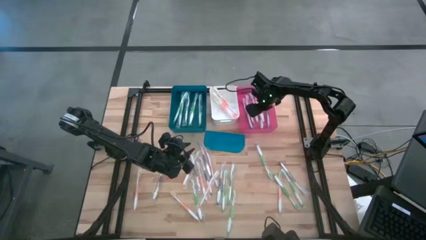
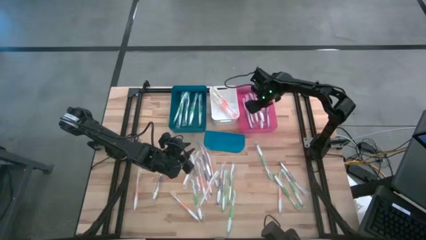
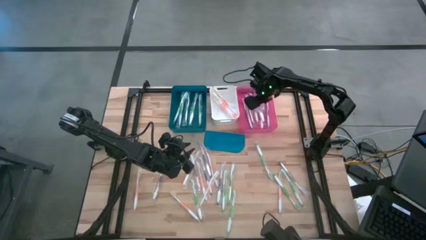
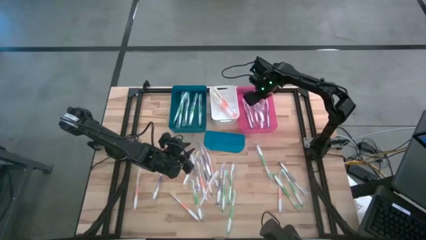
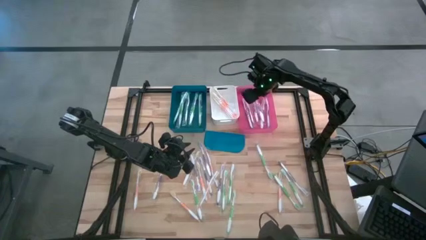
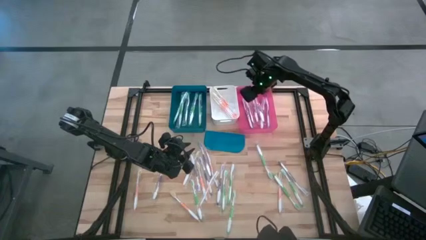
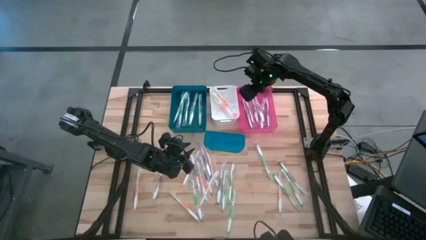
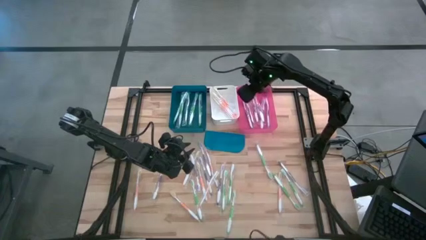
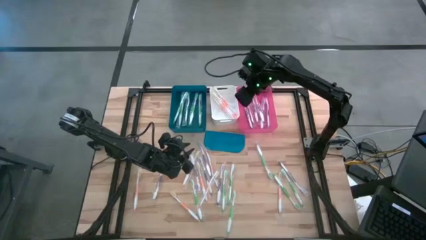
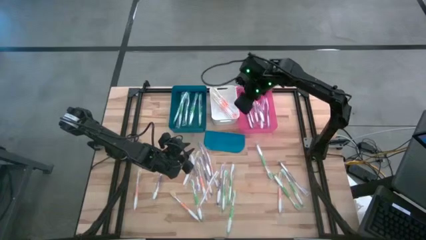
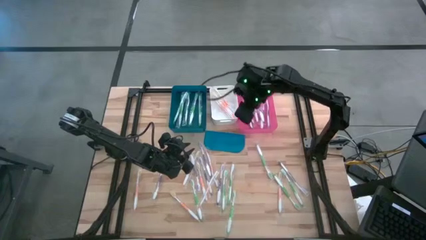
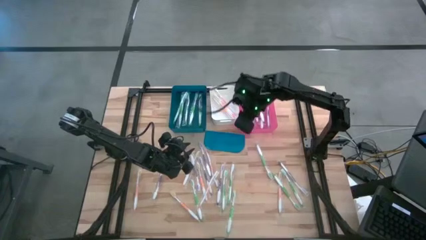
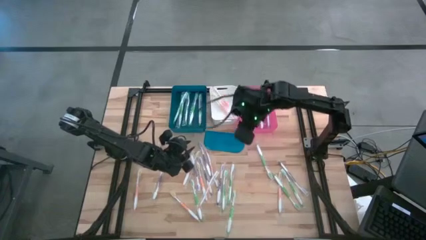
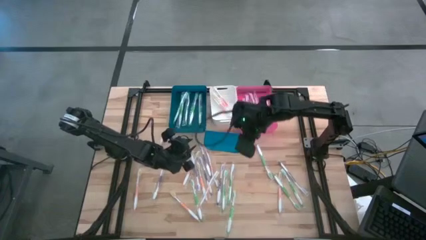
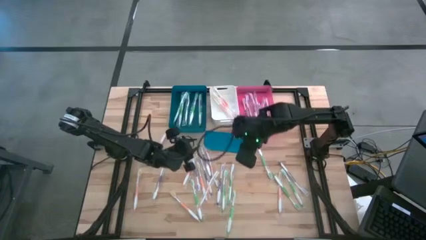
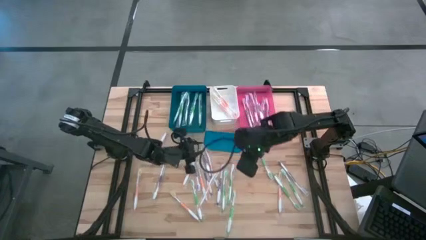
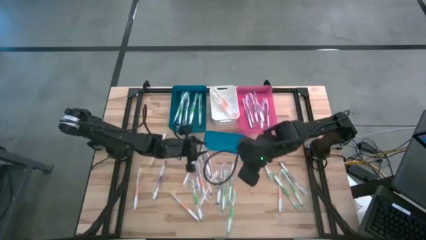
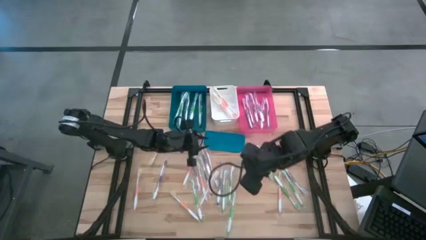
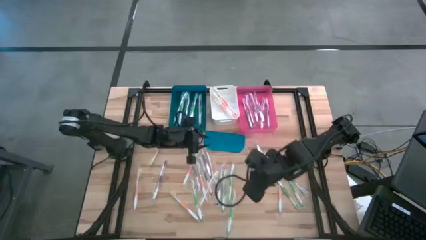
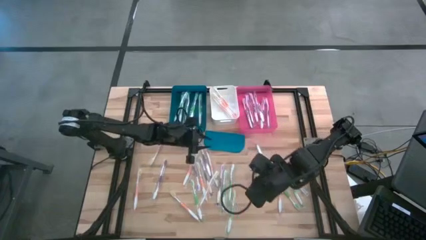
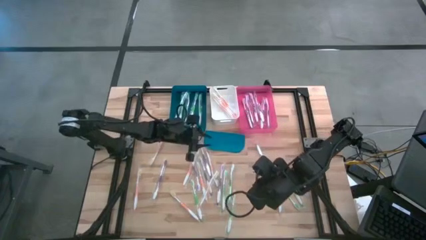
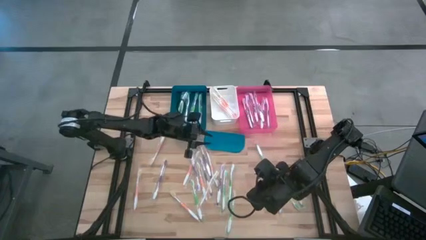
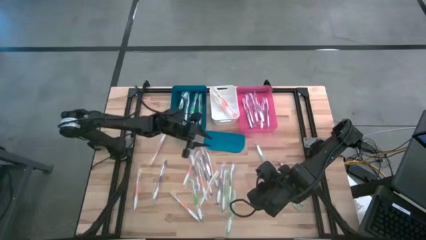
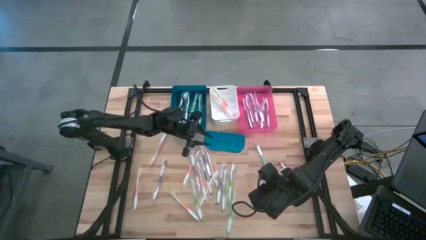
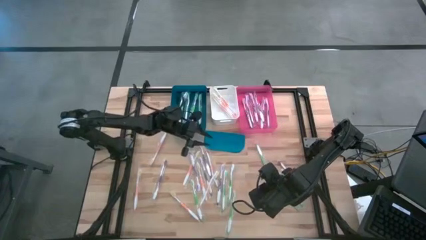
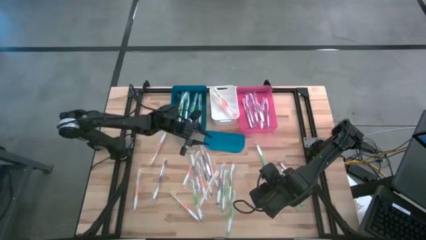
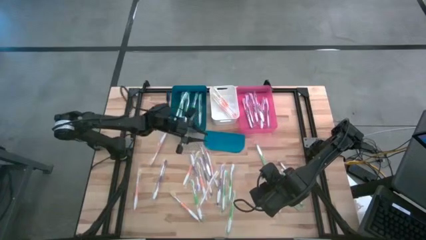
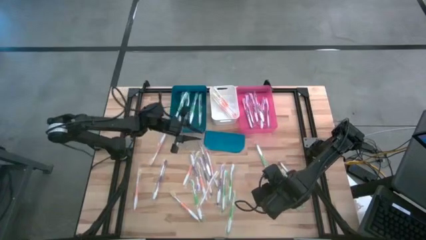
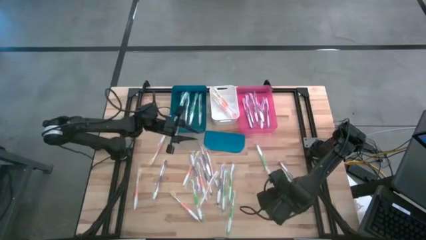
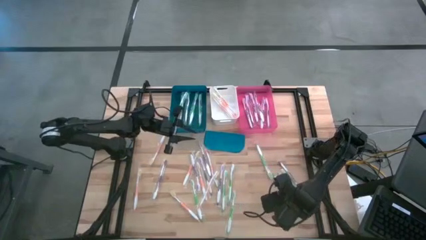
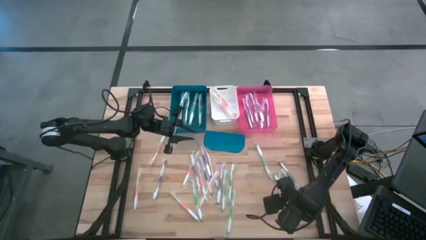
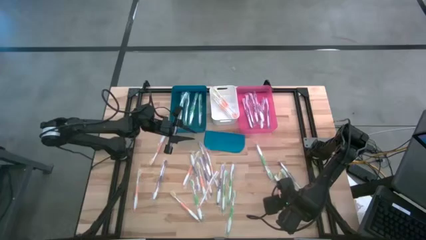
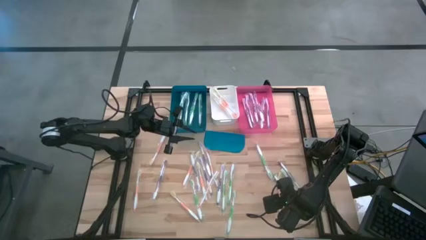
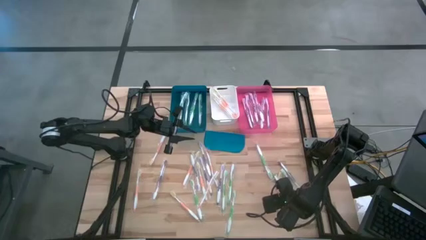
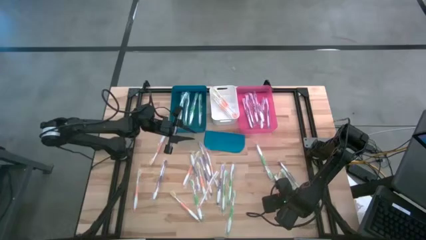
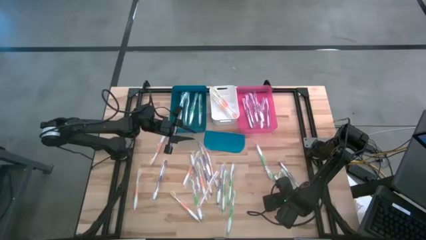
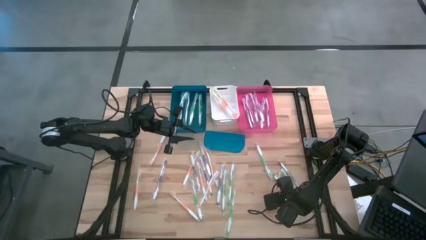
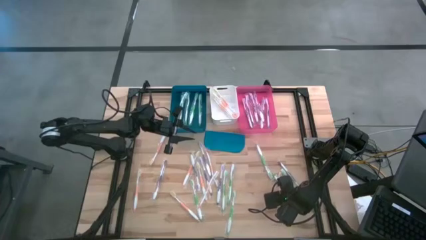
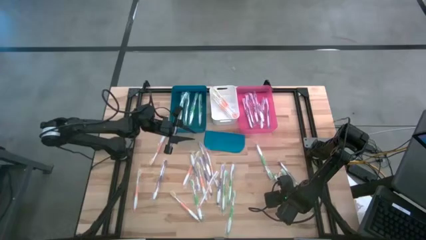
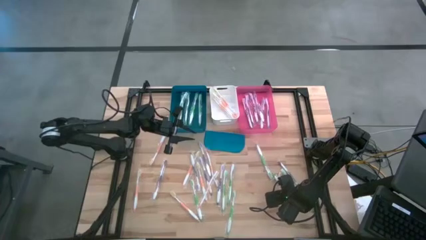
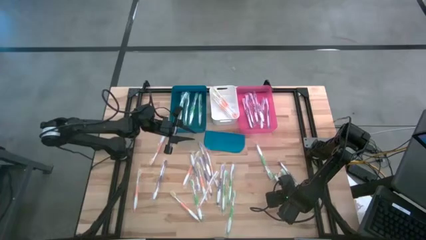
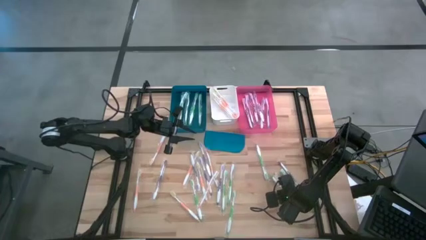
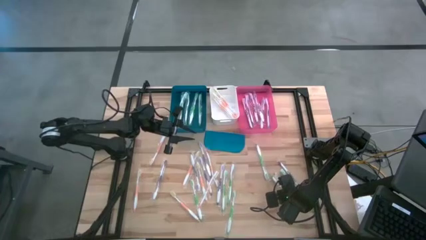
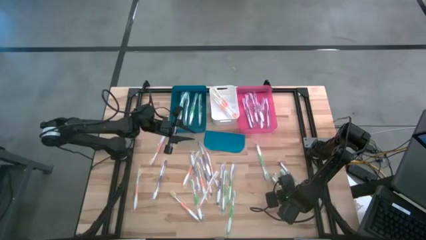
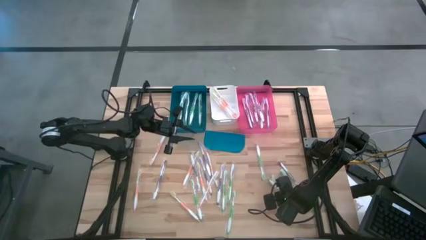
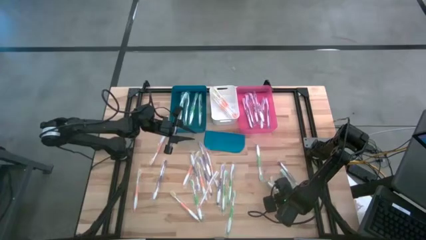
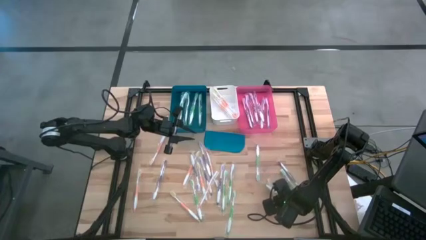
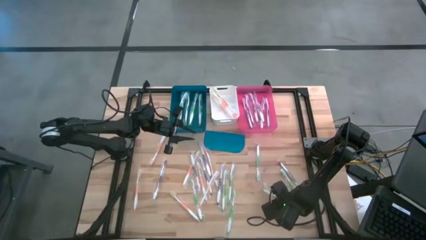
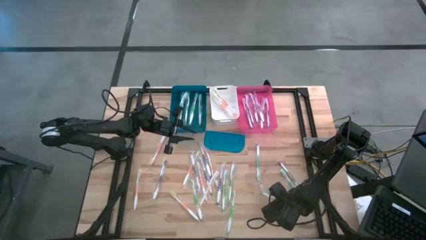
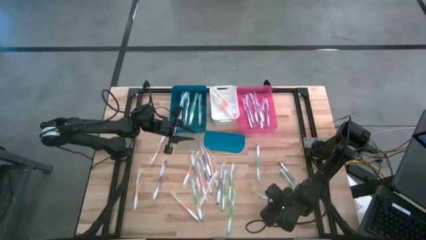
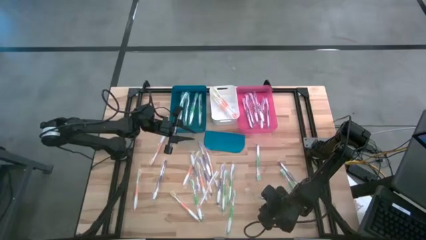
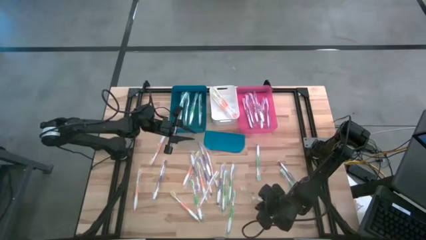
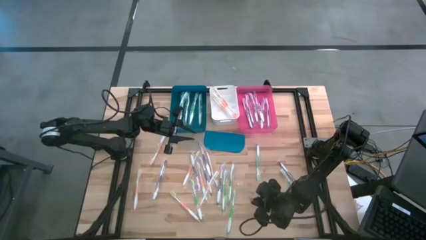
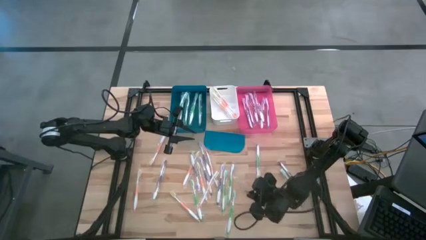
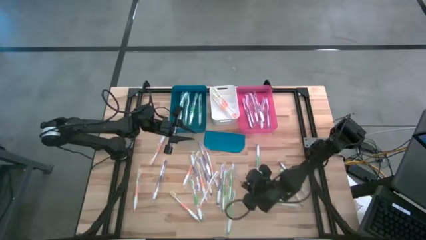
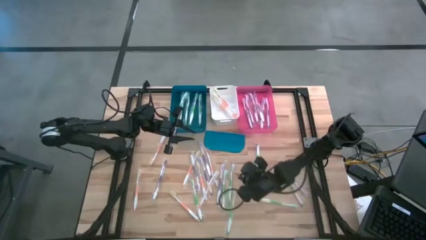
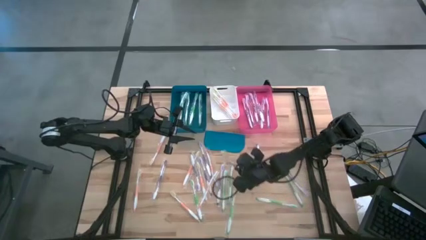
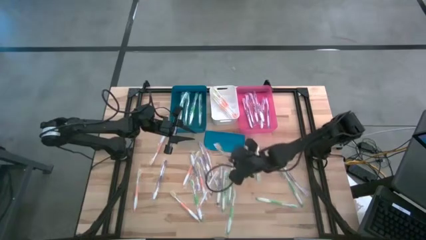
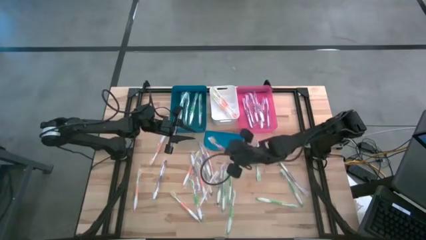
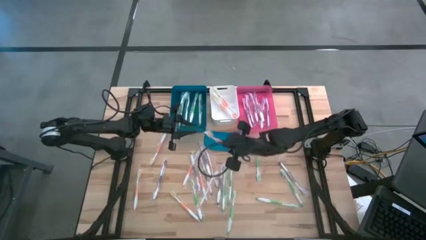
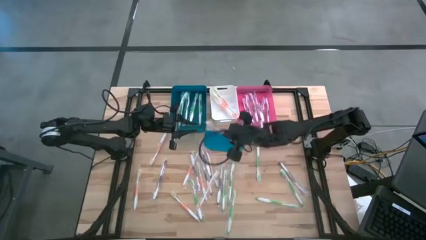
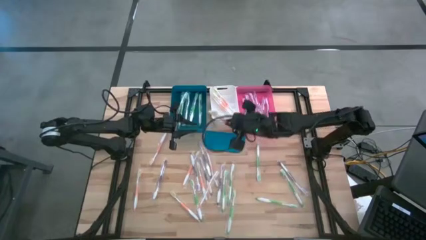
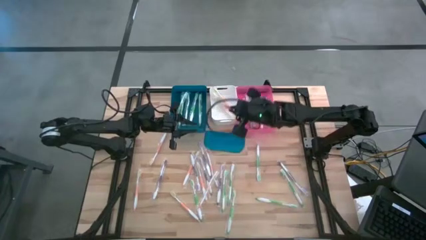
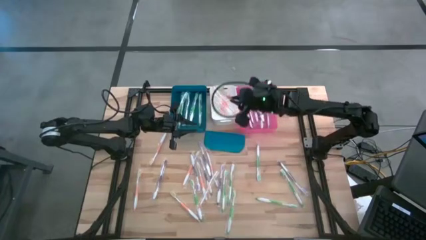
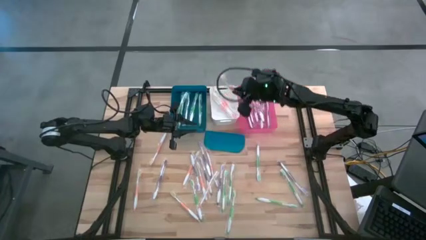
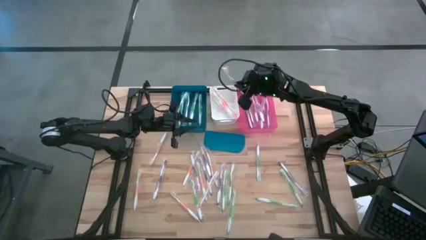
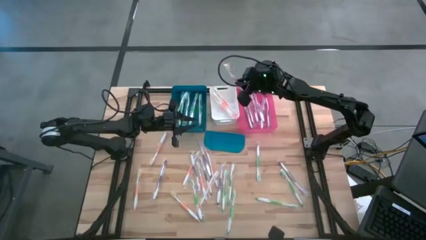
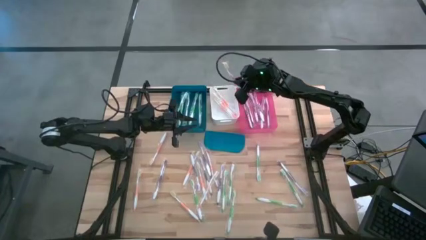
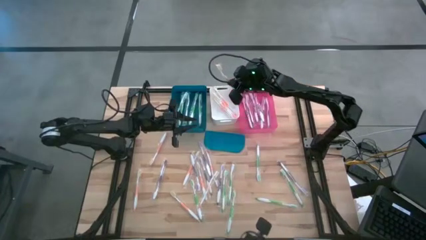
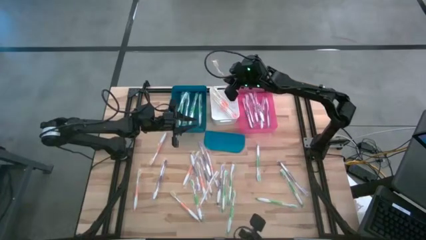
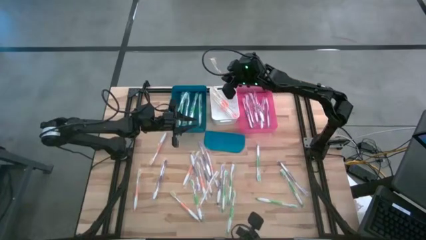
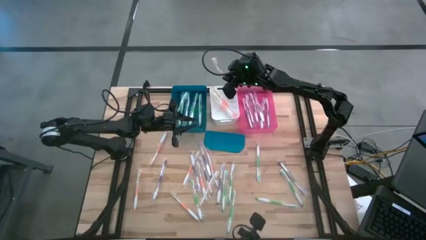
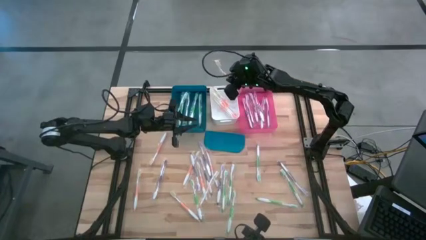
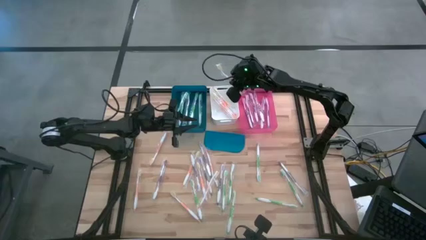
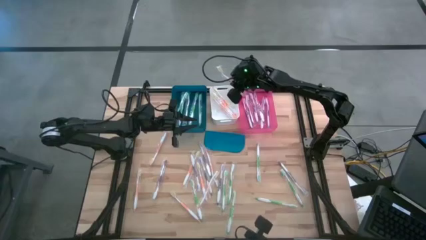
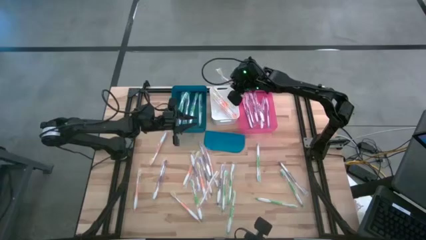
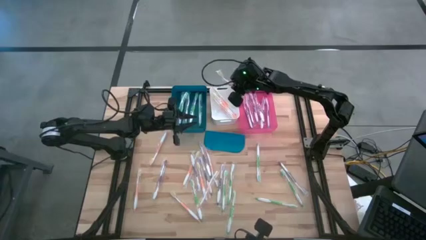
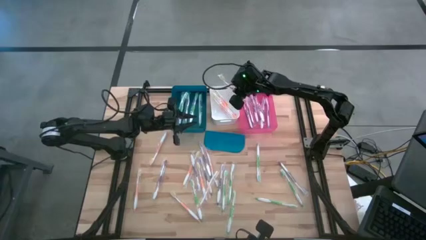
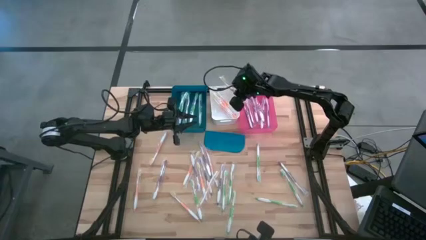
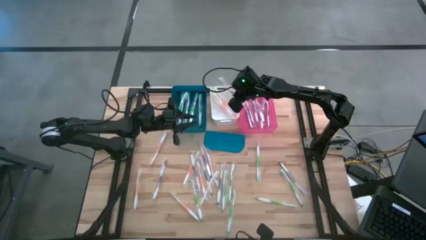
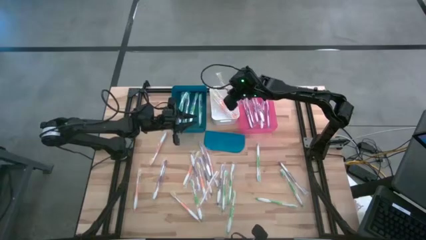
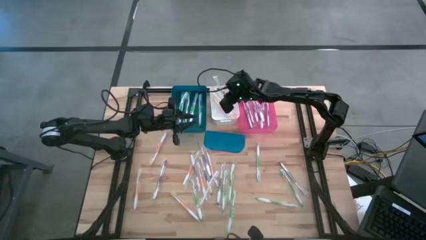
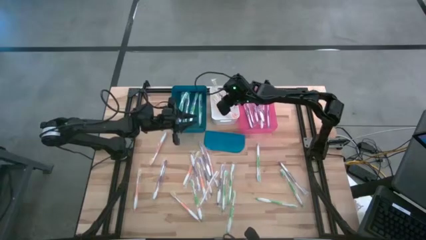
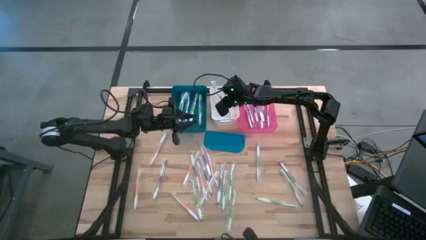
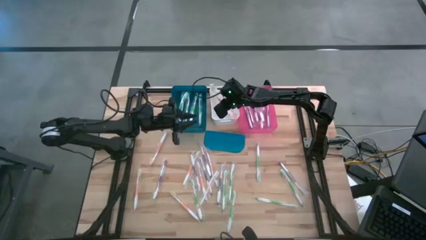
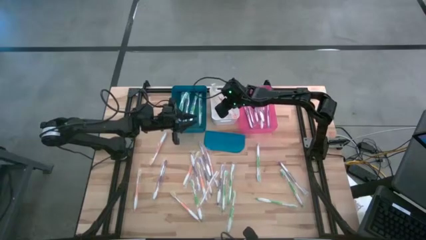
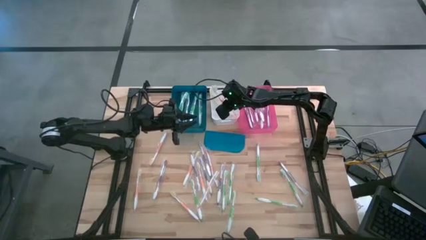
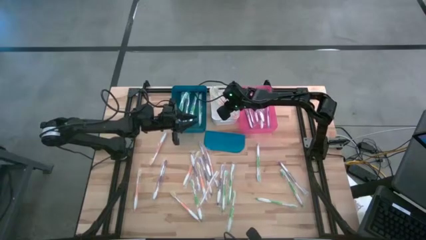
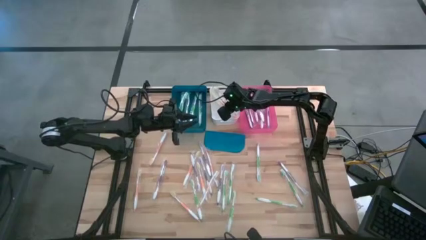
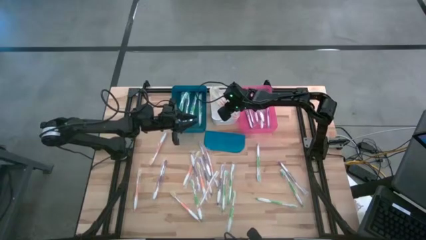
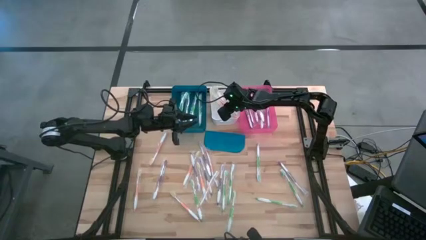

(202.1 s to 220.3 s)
Task: Pick & Place Toothbrushes
Put the orange toothbrush into the white bin
